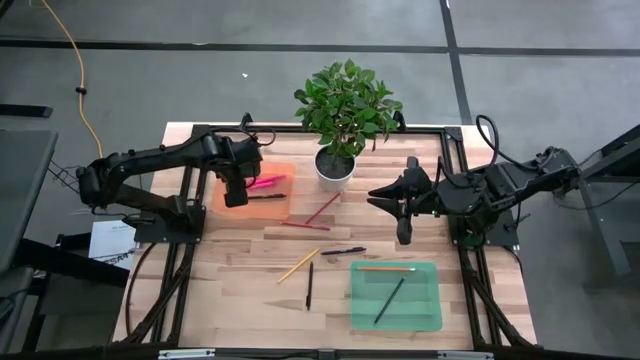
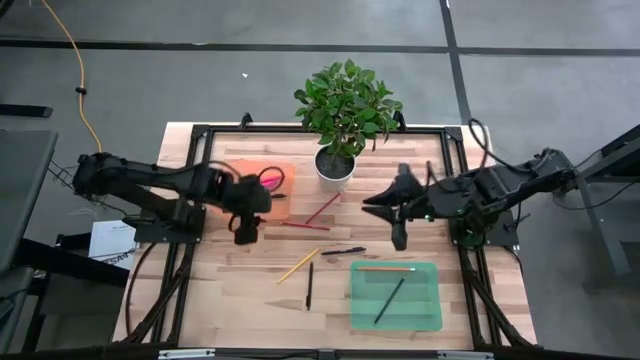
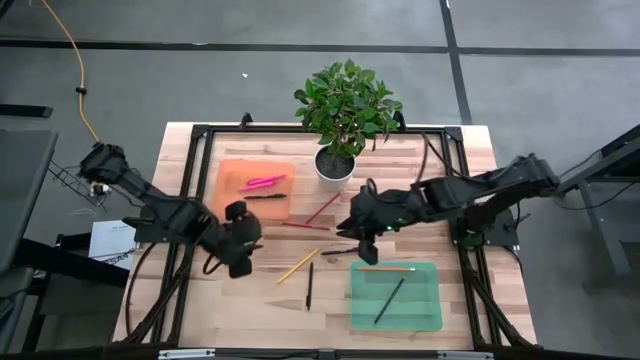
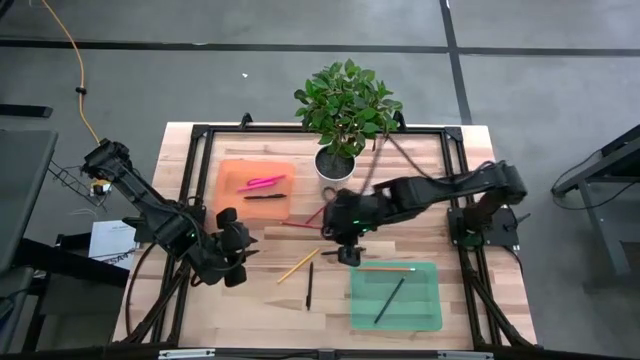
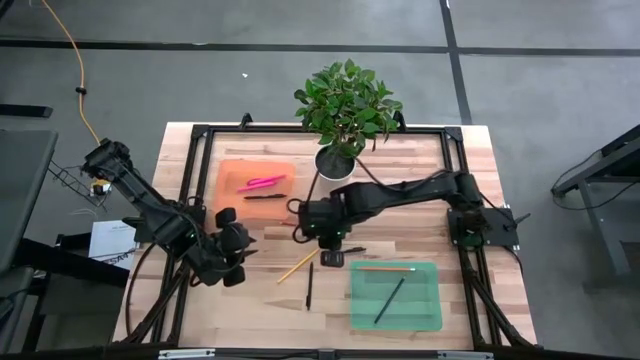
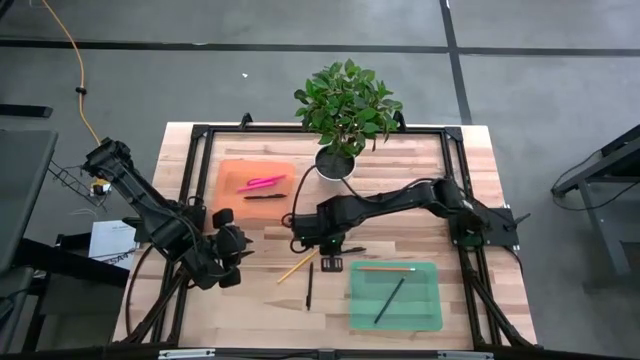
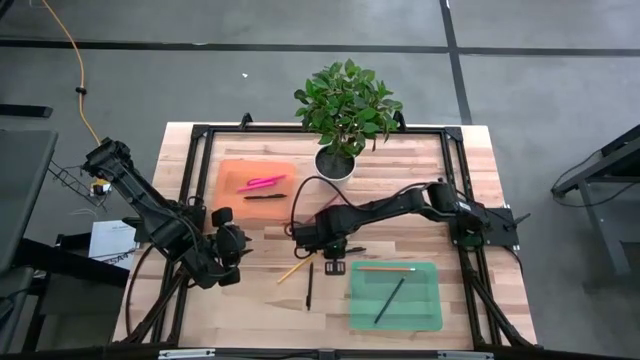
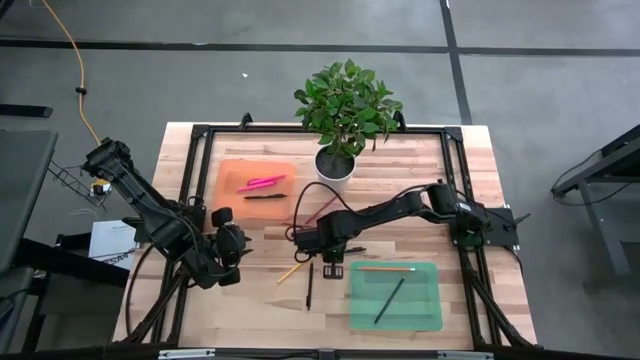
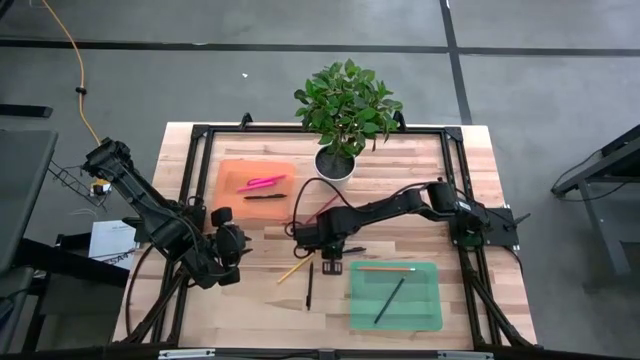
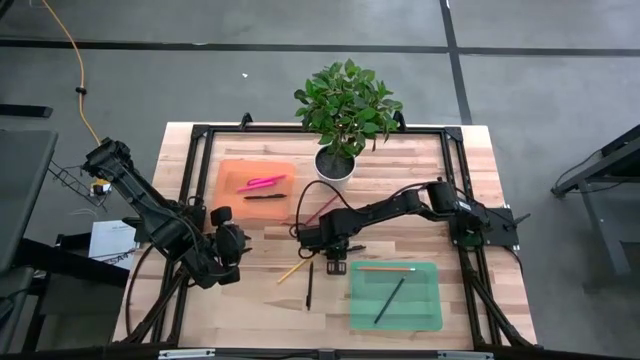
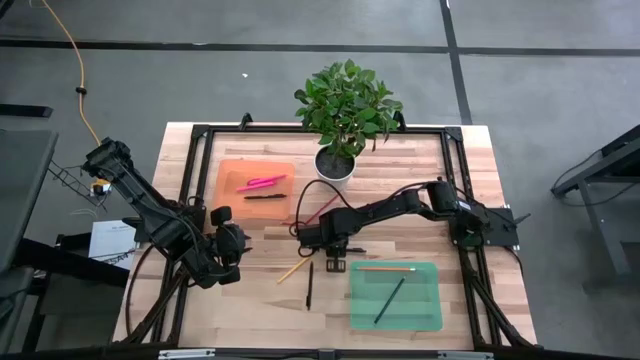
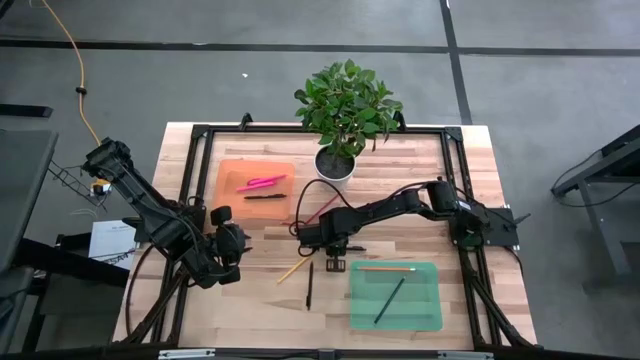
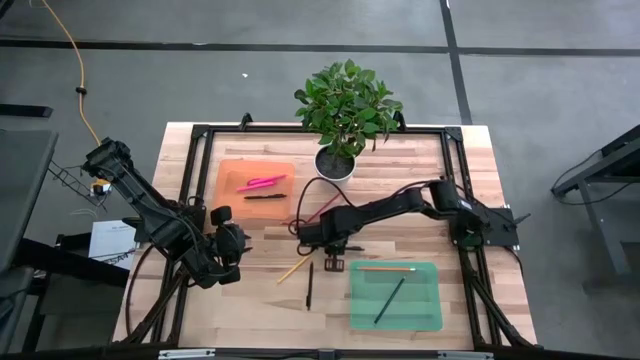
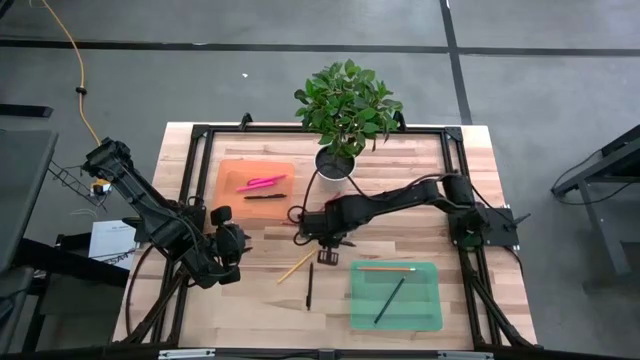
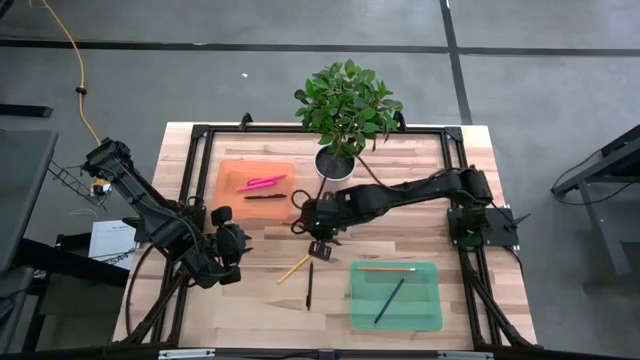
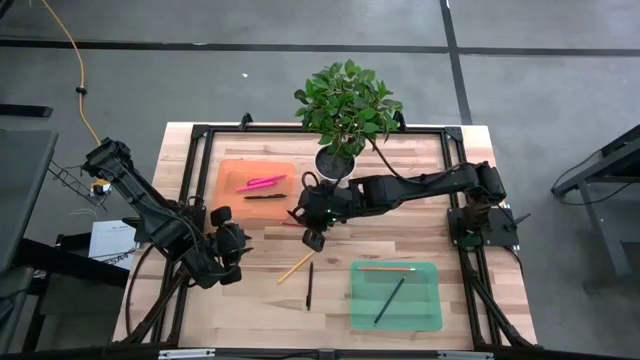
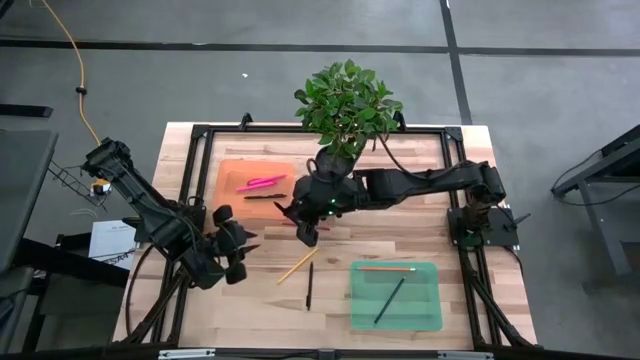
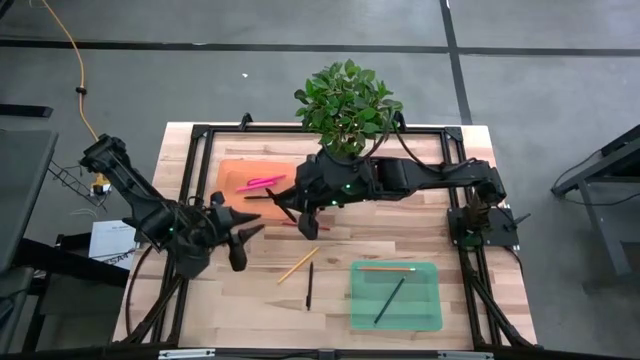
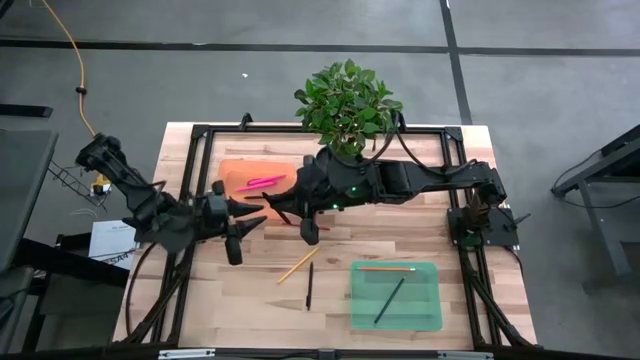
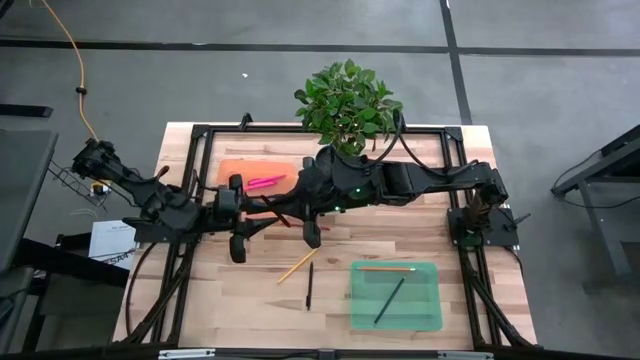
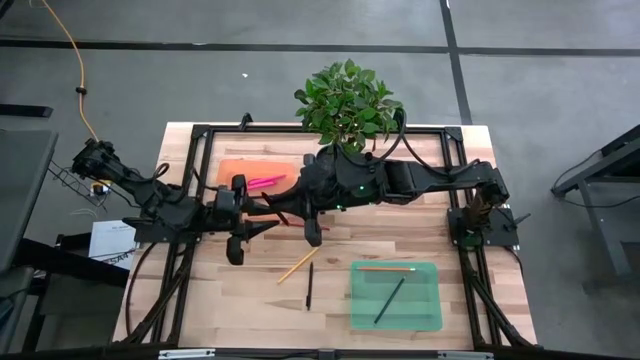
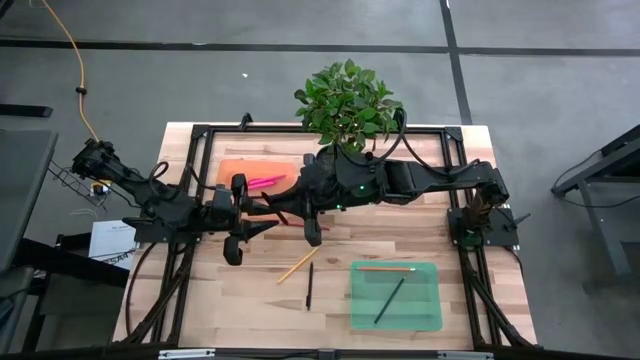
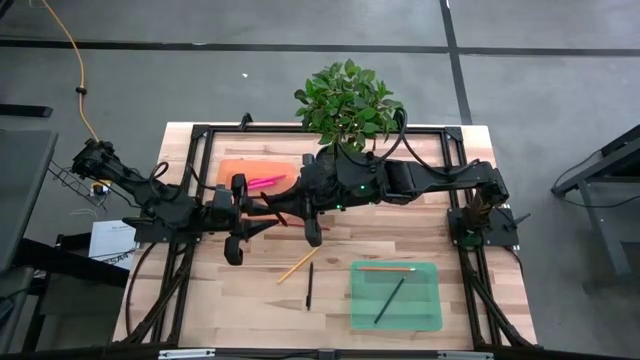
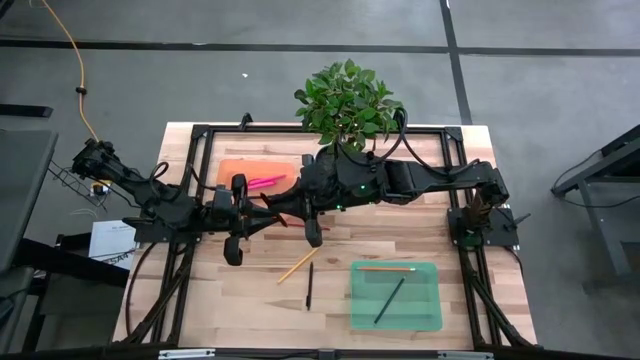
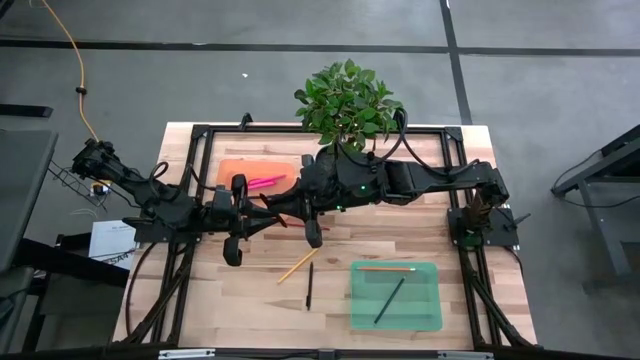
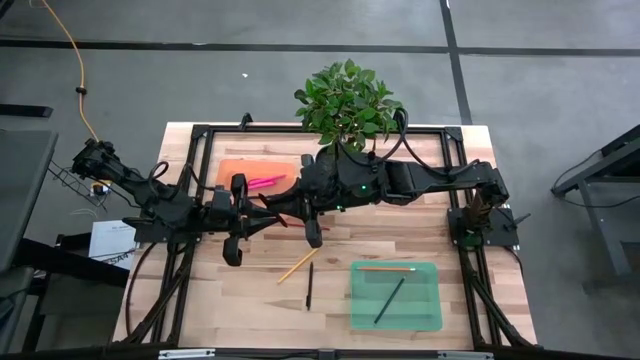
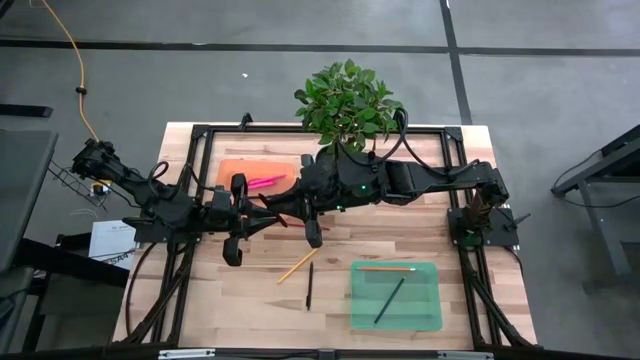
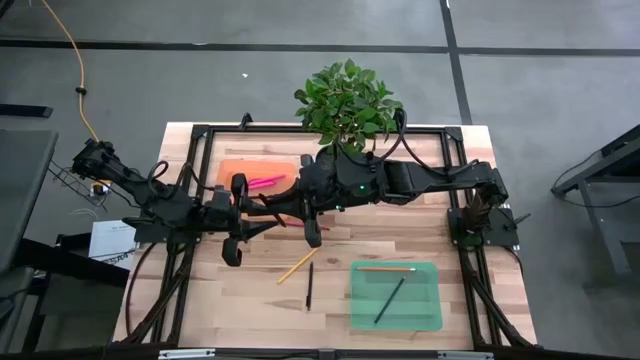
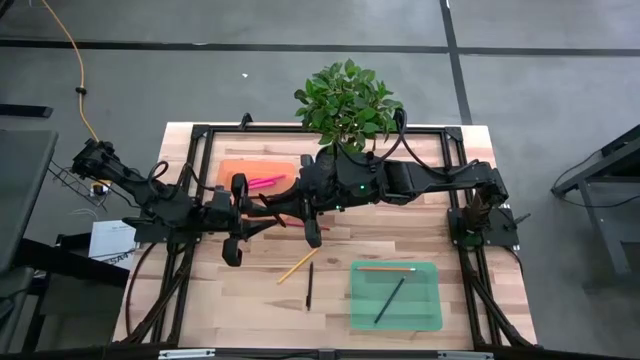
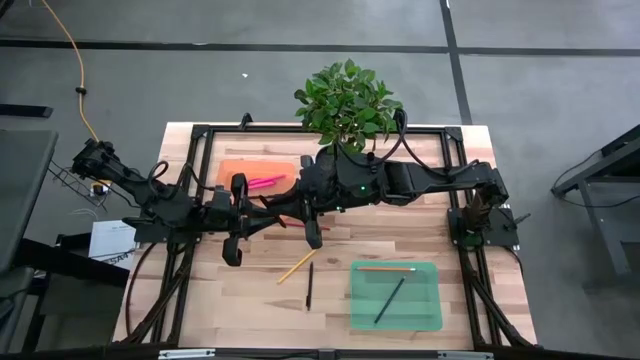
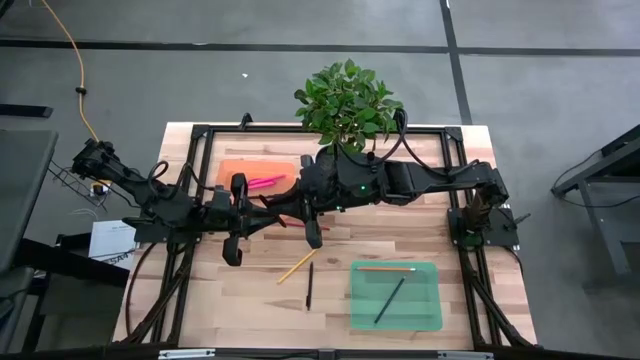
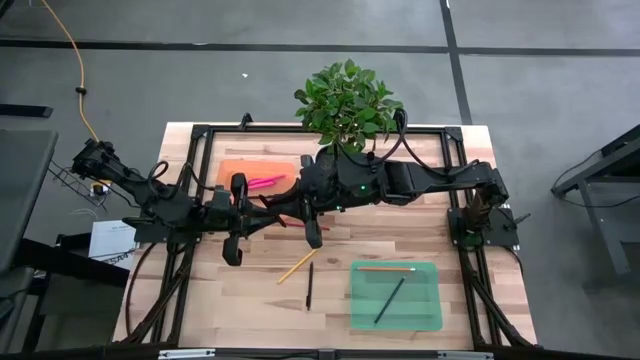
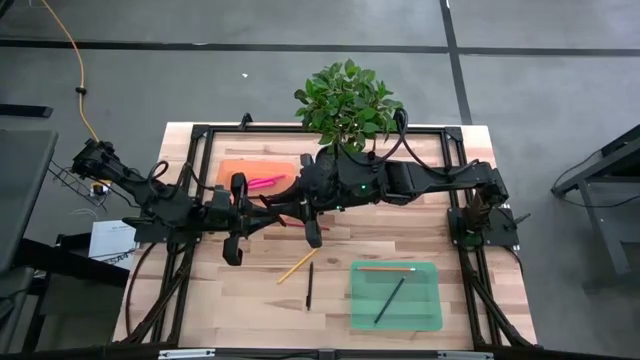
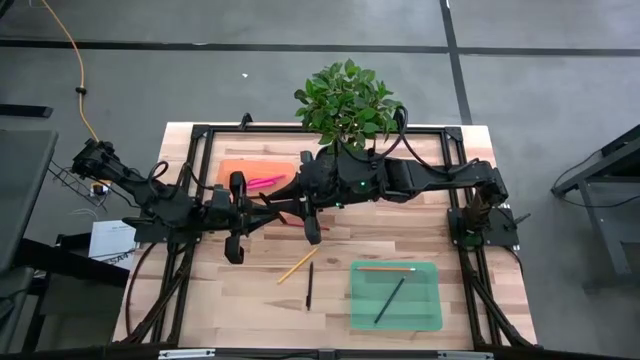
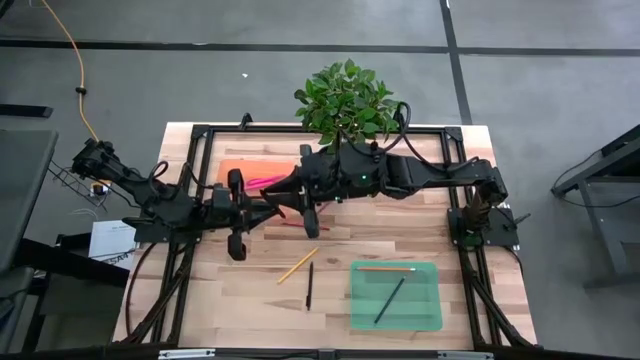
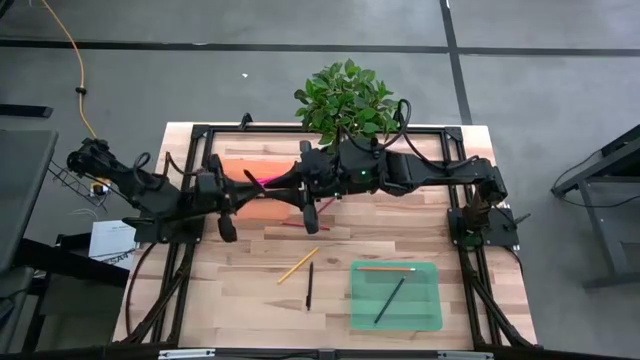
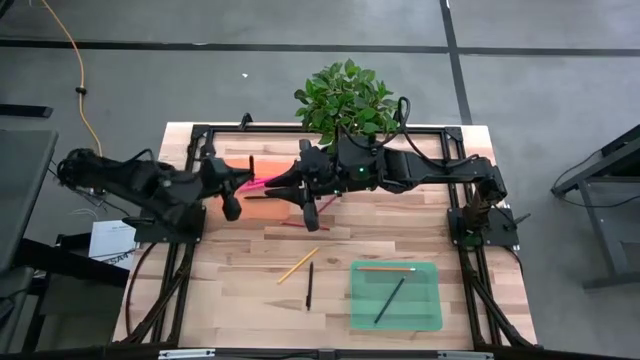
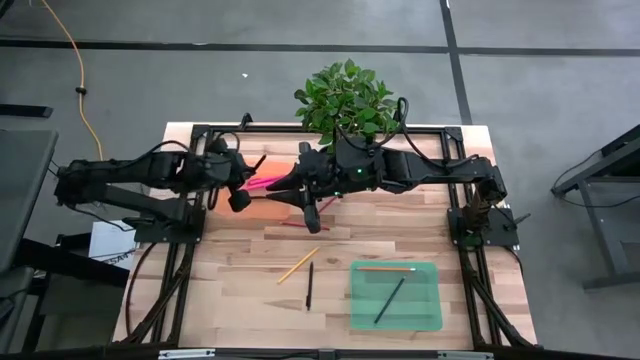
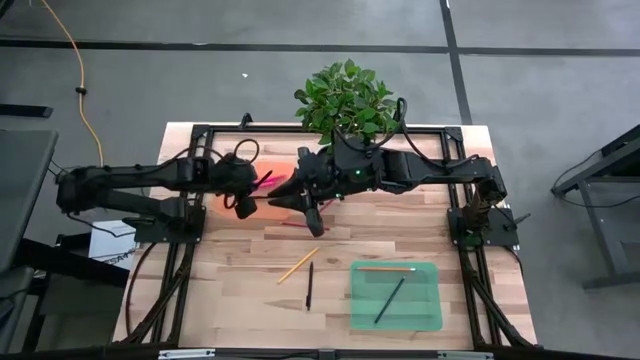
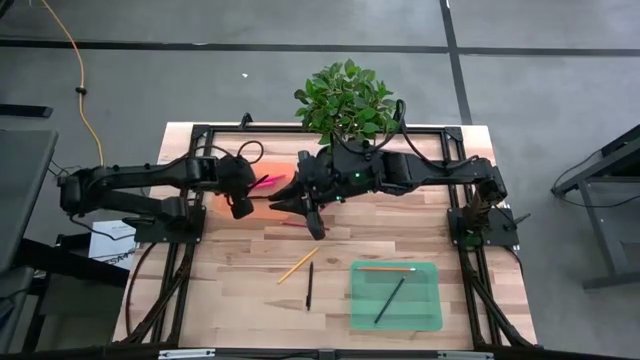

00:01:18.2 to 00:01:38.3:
Task: Sort pens & pencils
Put the top black pen into the orange bin
